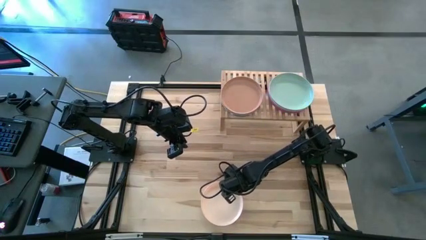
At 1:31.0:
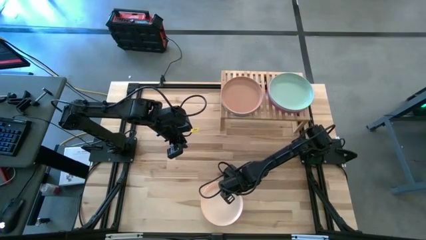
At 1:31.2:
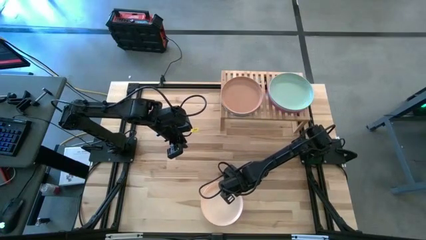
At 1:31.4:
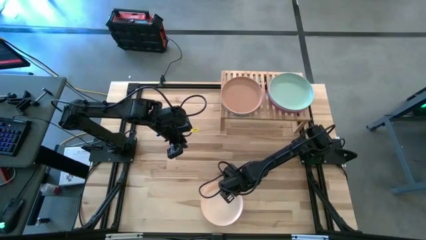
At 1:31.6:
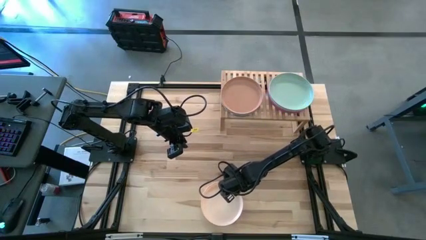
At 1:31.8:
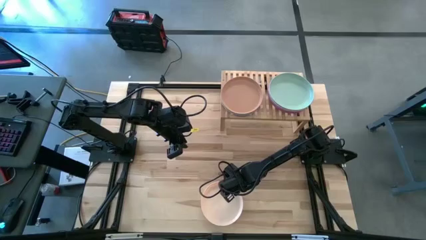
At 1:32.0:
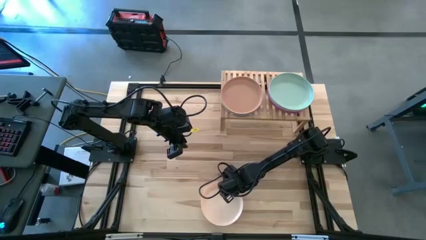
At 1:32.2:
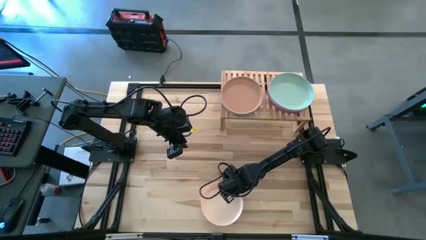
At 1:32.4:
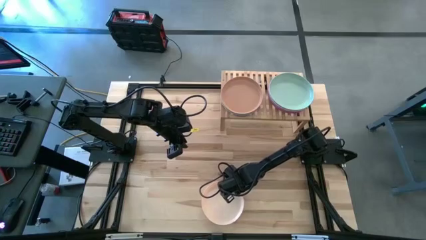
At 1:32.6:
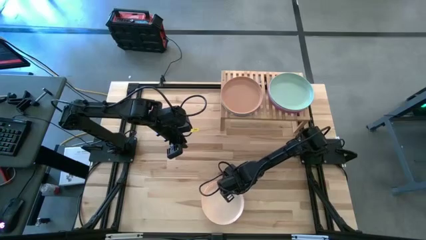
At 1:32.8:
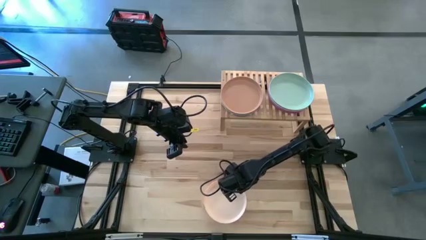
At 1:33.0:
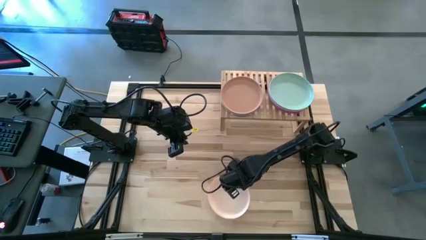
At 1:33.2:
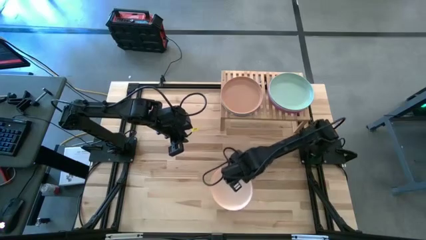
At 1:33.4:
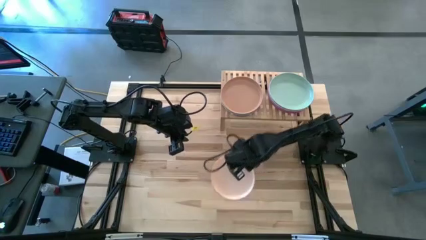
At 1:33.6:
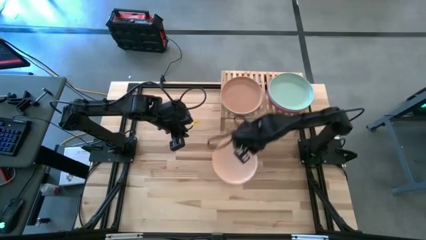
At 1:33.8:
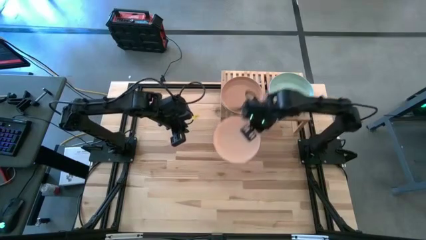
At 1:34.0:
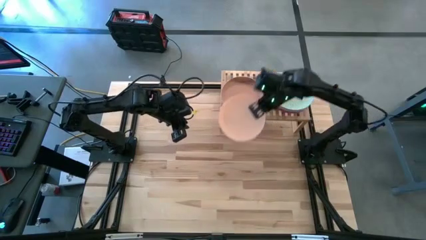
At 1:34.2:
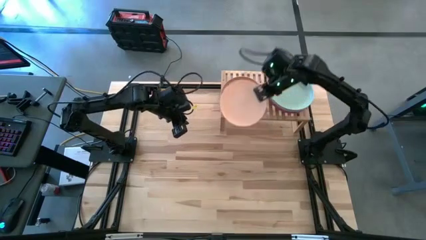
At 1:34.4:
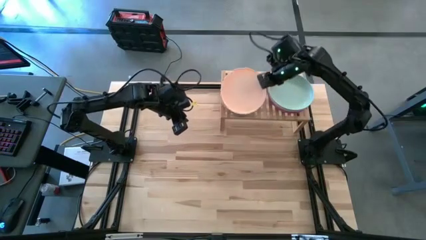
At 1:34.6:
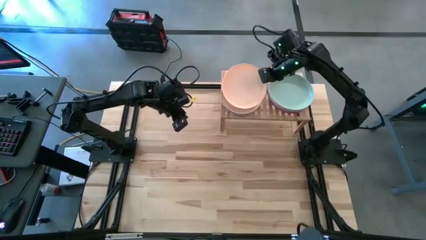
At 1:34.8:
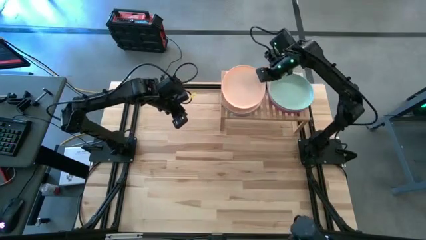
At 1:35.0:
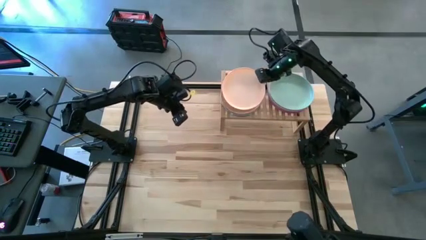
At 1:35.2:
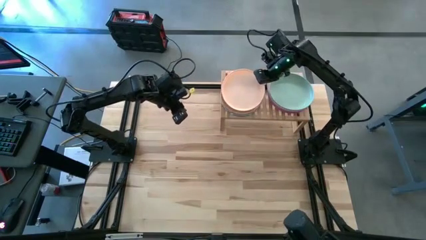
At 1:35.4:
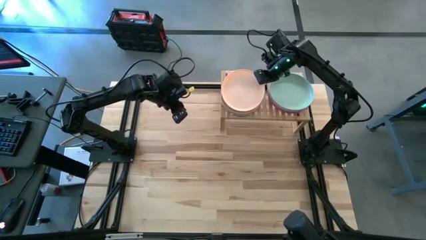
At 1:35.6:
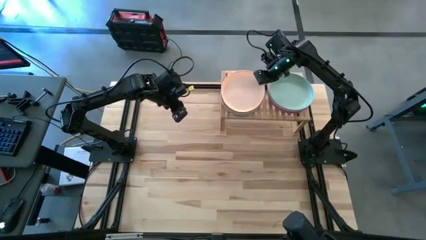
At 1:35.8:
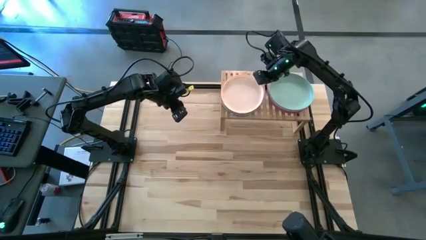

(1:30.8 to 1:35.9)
Task: Place and stack plates onto a shelf
Stack the light orange plate on top of the brown plate on the shelf

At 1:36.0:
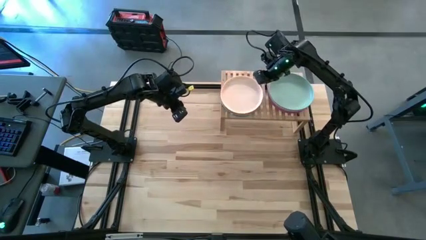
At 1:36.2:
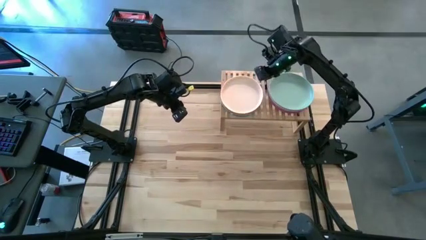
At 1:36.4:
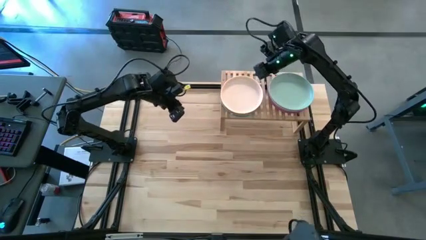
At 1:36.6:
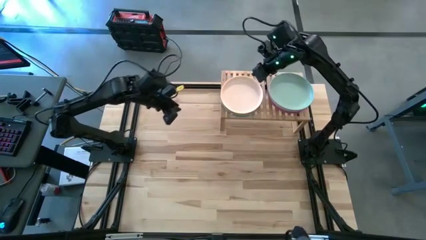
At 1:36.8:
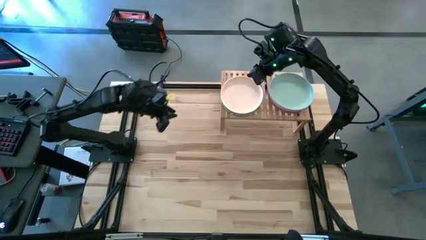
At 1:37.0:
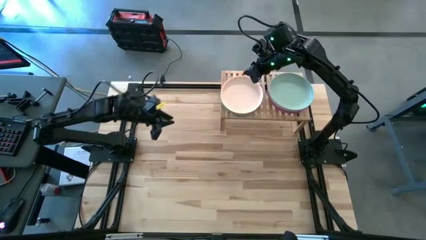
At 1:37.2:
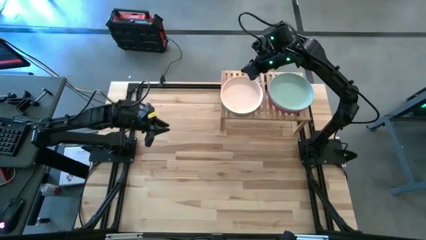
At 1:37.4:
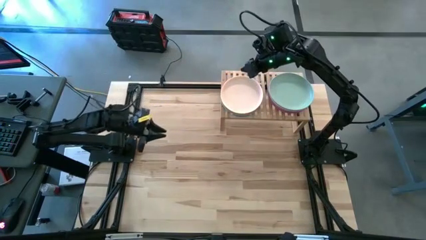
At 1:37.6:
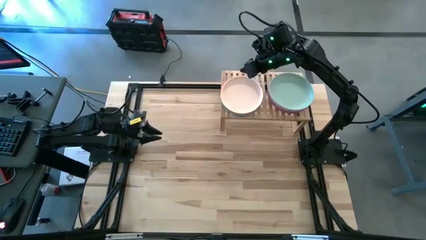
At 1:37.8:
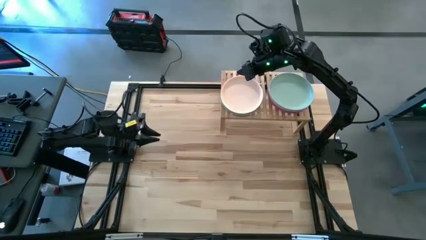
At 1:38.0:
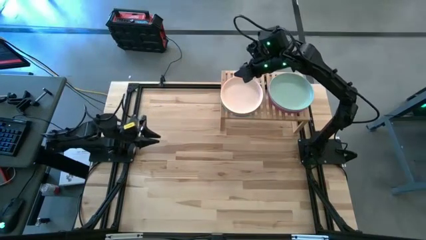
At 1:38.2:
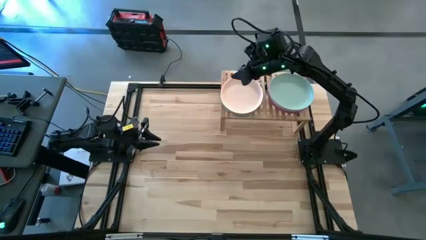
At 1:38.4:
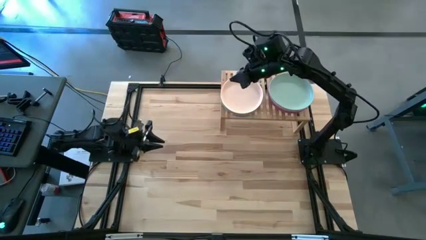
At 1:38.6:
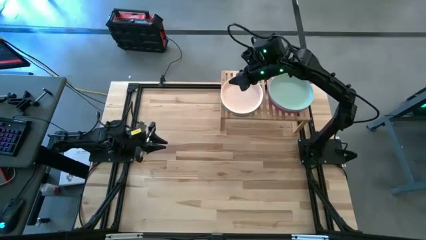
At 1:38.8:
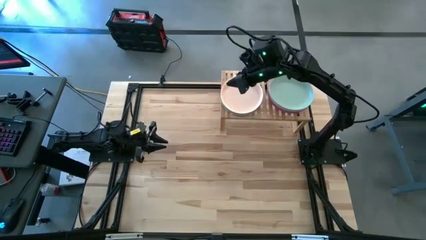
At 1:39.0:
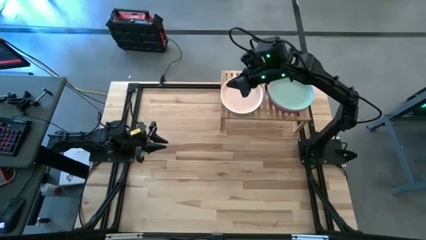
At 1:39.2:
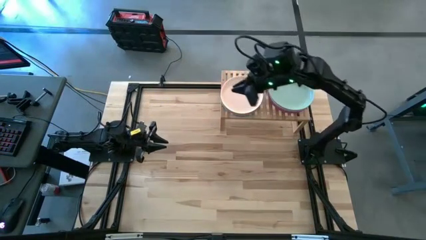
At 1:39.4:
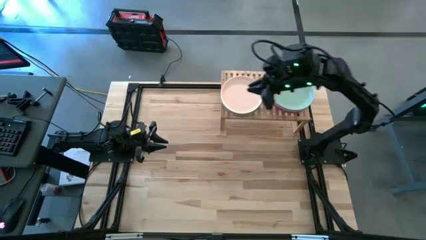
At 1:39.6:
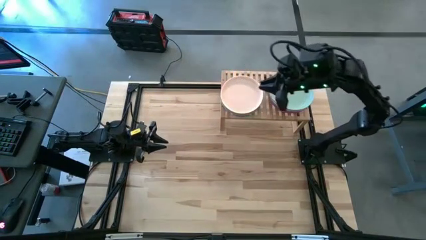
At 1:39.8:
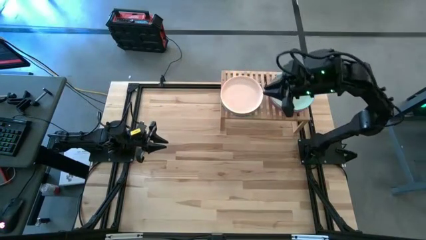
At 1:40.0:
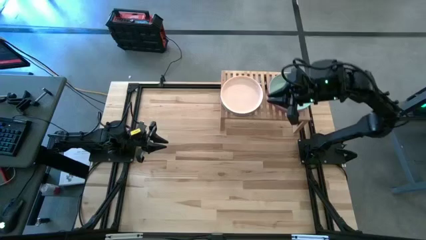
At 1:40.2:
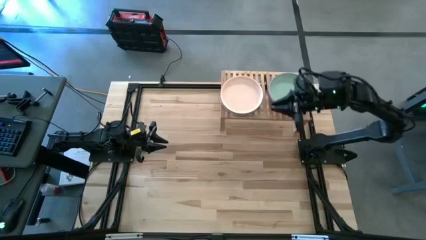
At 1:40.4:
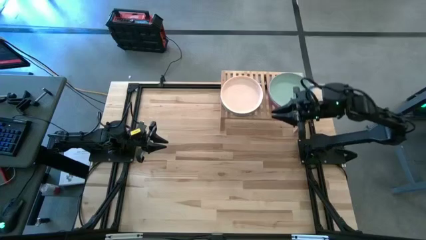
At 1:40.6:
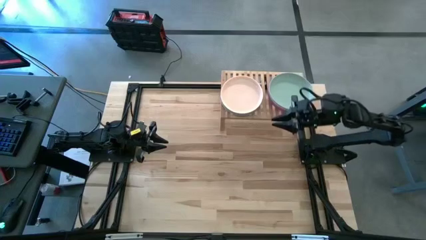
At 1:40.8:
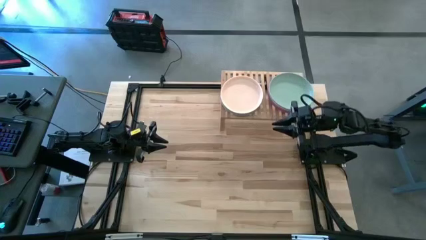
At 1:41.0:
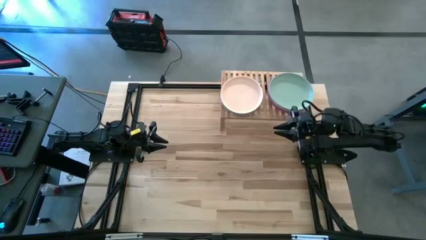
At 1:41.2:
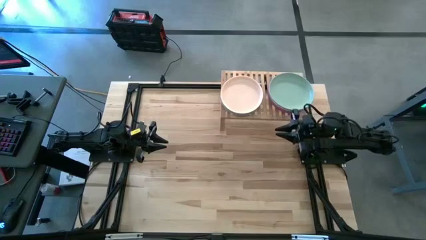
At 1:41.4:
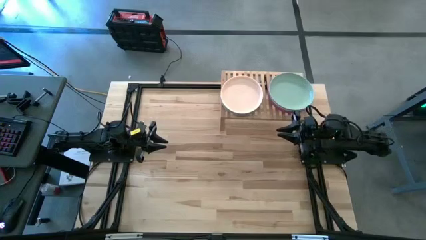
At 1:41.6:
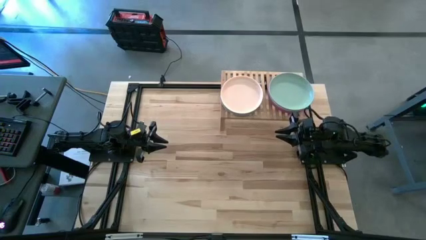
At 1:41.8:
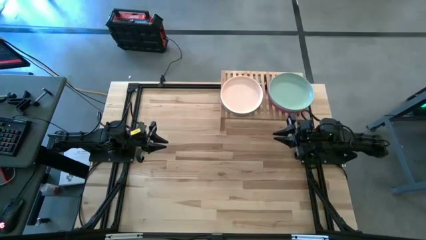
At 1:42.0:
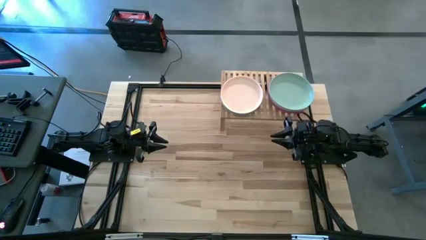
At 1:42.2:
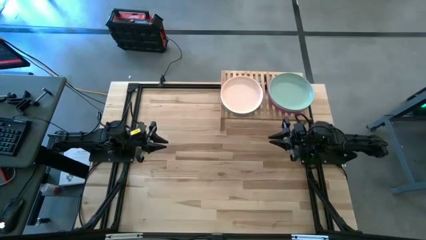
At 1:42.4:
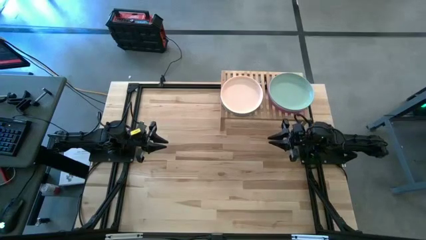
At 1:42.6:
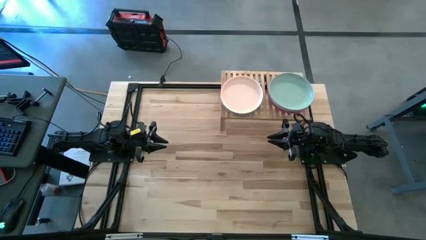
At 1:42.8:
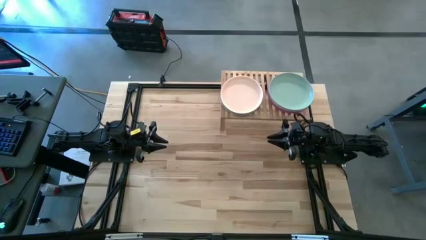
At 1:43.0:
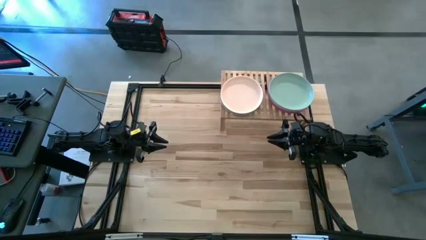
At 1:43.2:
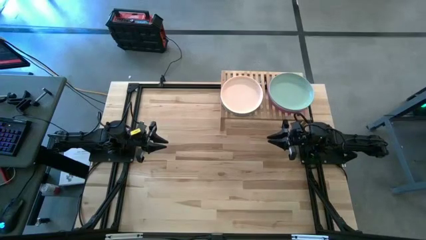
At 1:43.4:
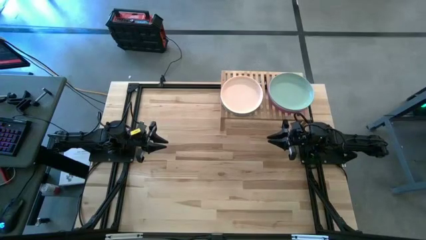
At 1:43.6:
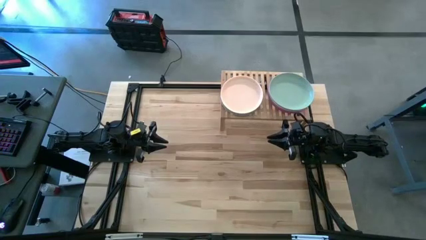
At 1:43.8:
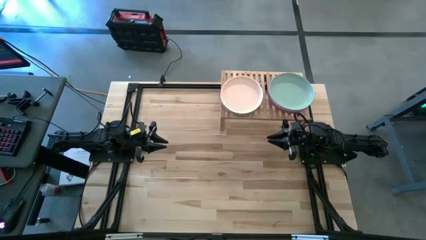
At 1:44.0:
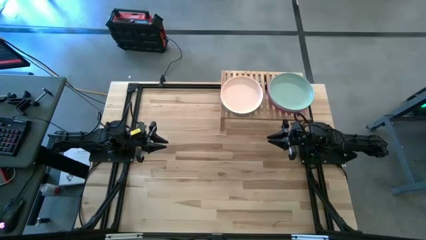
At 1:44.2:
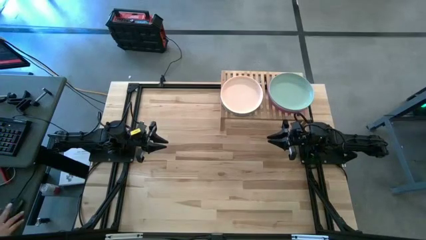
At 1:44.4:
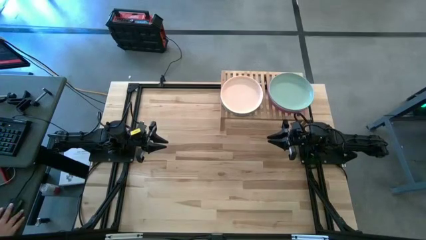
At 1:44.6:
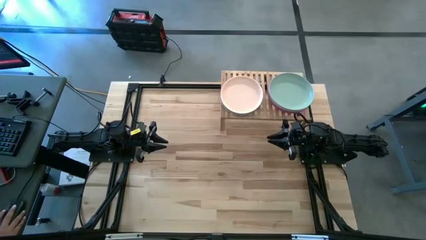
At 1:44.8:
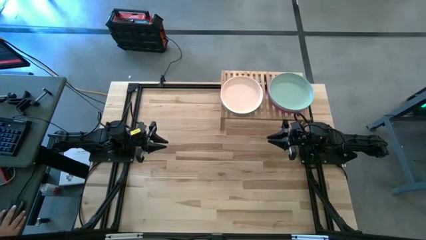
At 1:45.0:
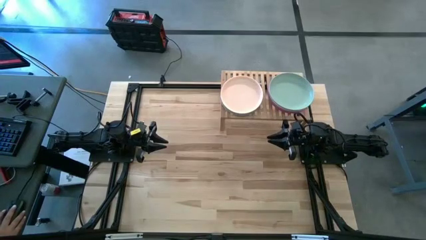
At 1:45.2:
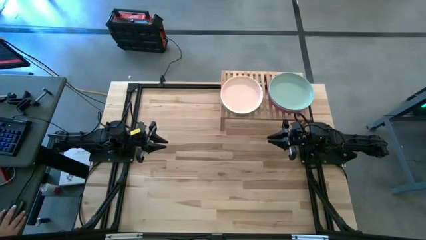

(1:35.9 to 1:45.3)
Return to Home Position
